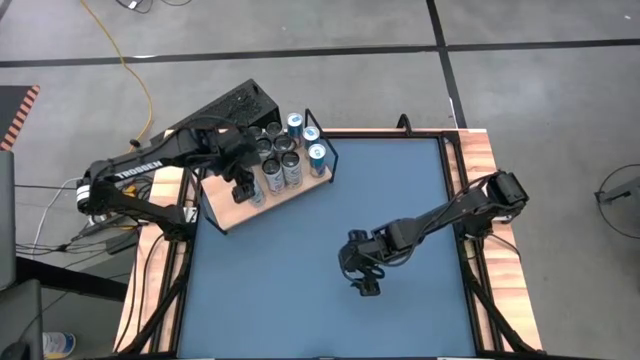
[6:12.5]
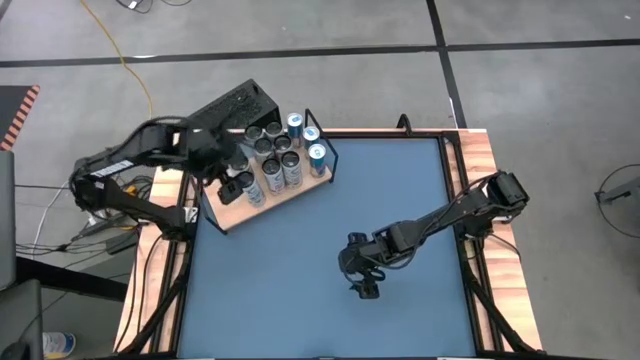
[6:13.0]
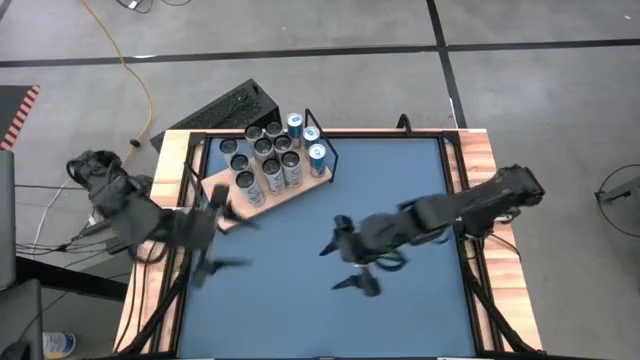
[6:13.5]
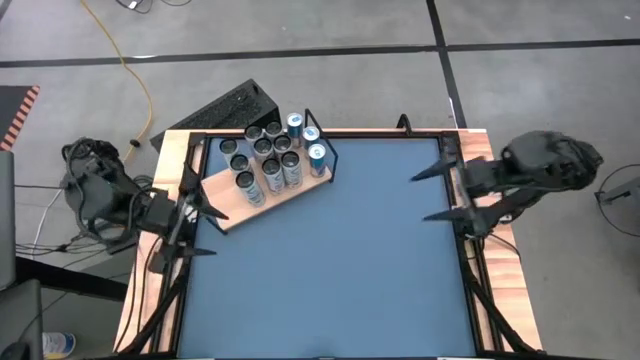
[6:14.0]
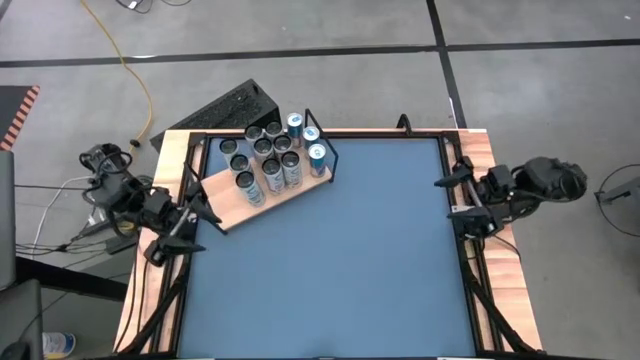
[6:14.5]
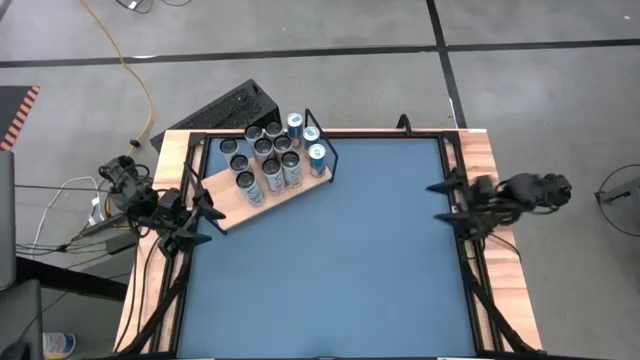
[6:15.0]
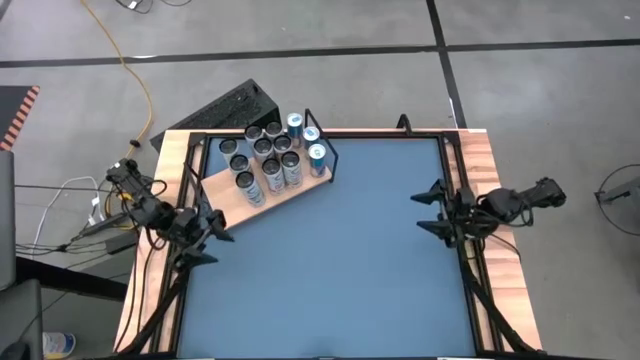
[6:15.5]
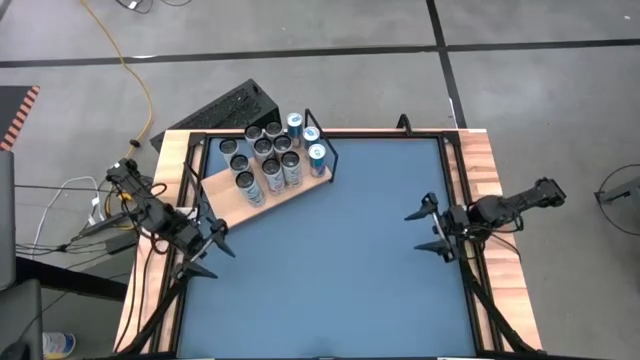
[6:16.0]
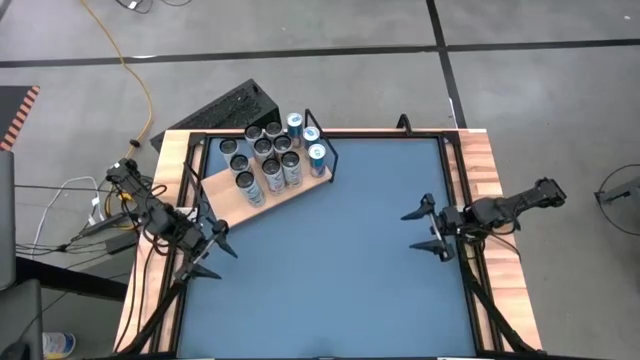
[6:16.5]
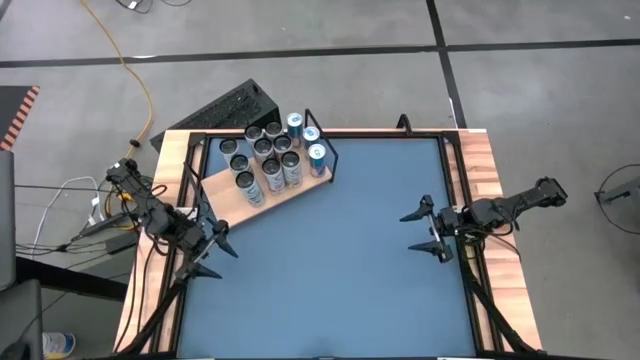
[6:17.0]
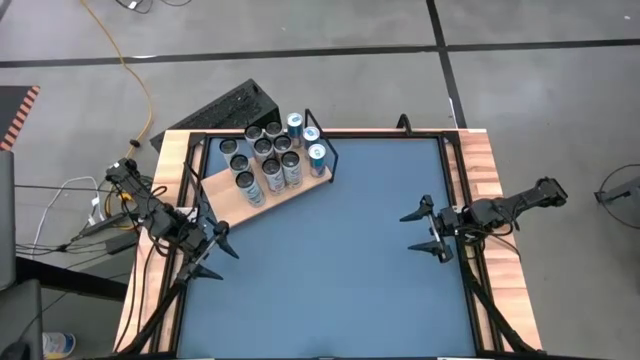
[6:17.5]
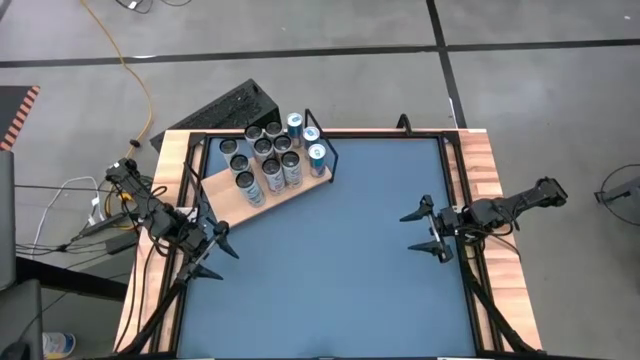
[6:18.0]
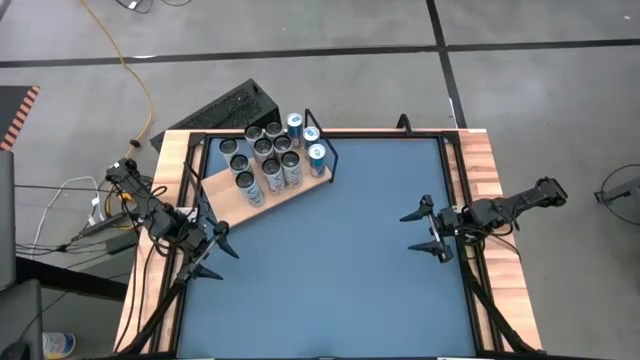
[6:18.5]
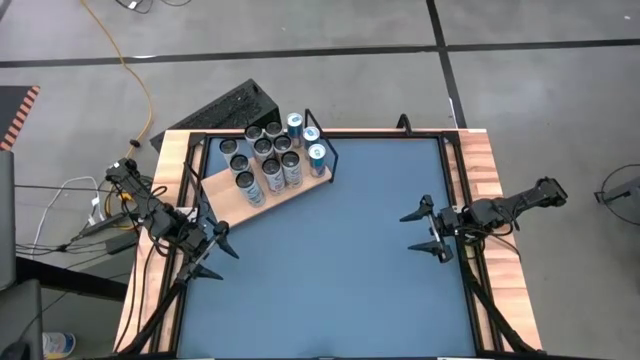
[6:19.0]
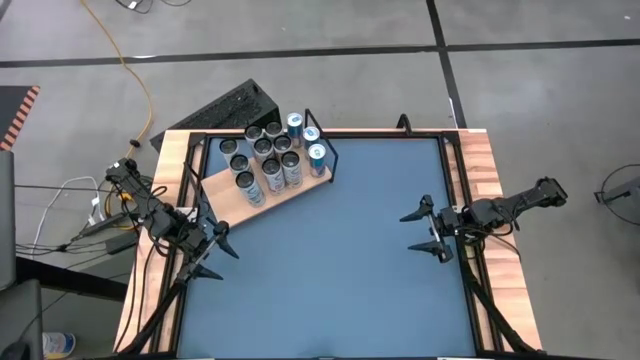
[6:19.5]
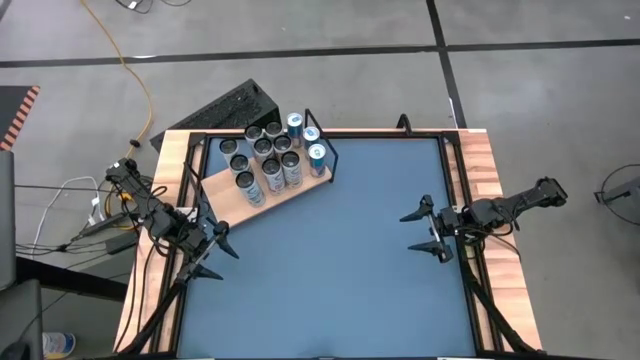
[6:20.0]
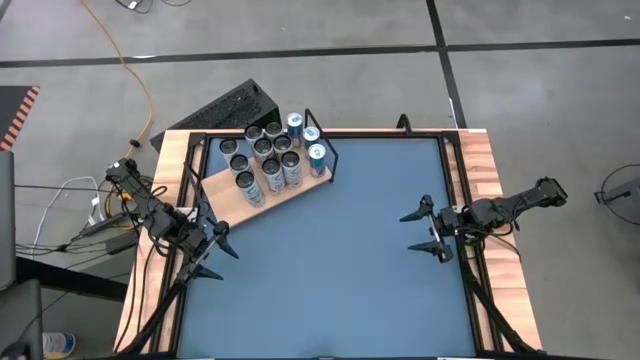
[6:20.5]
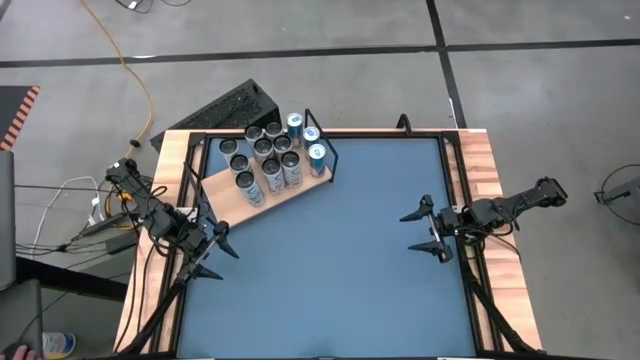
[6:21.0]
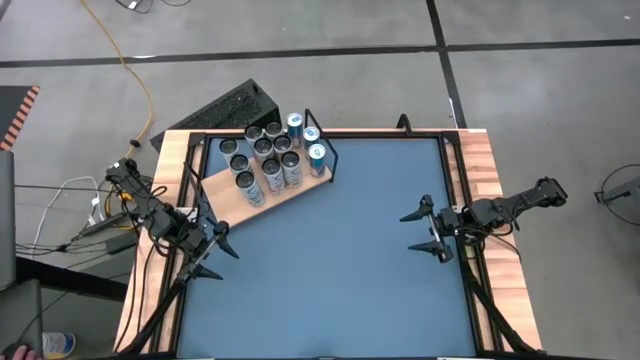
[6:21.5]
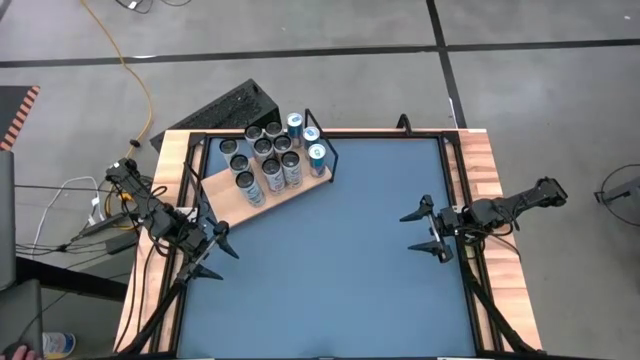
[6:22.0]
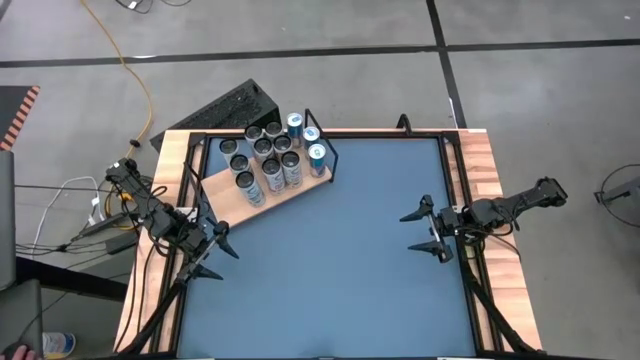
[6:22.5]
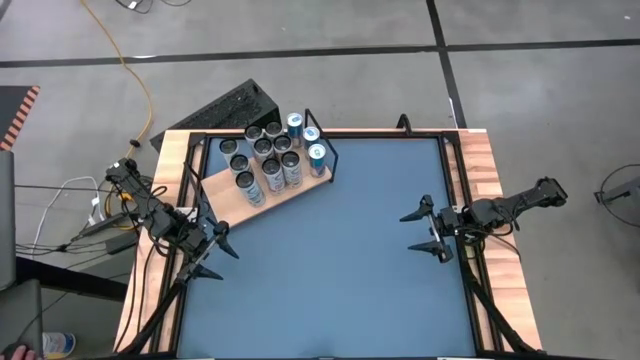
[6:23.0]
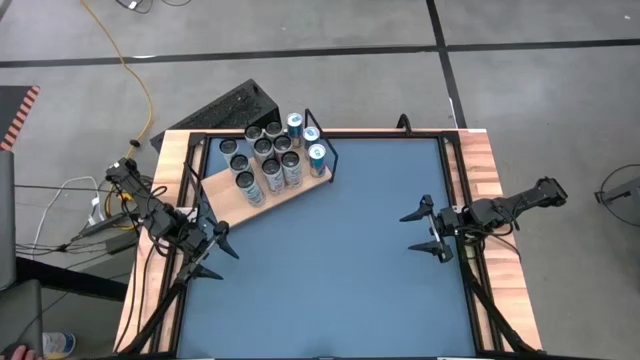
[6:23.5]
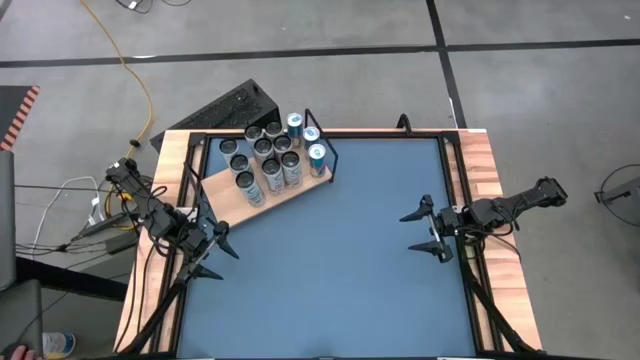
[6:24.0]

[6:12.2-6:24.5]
Task: Place canned beverage on shelf
Return to Home Position

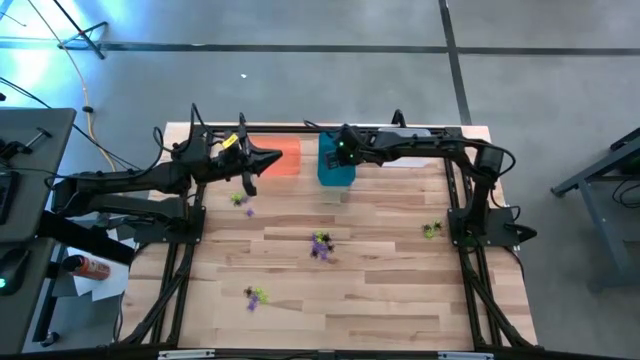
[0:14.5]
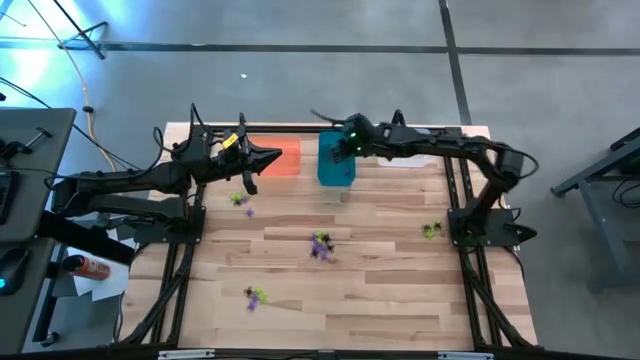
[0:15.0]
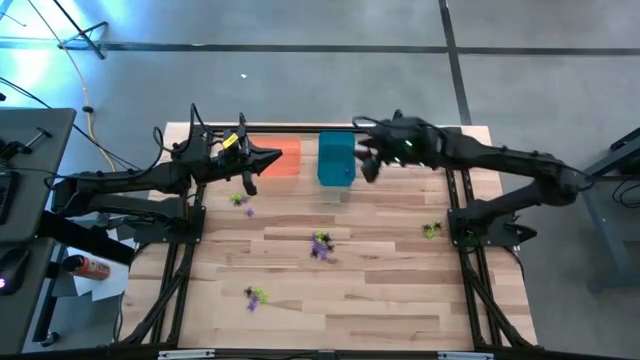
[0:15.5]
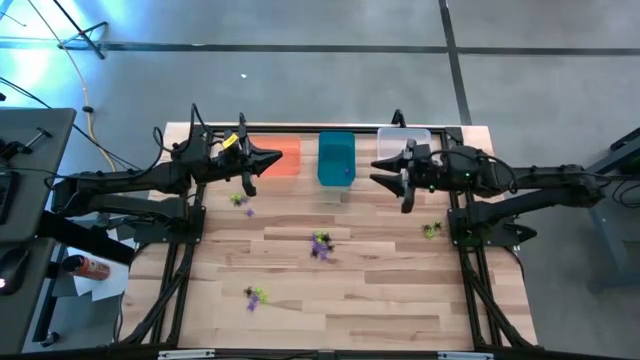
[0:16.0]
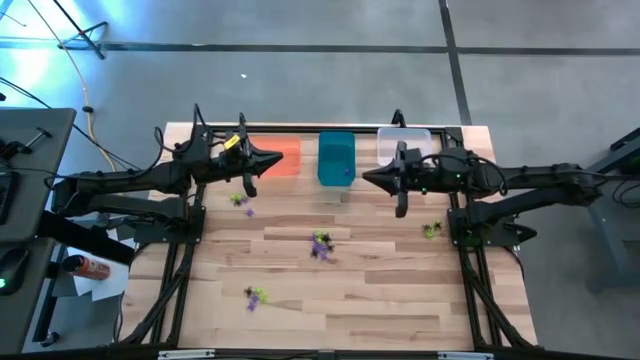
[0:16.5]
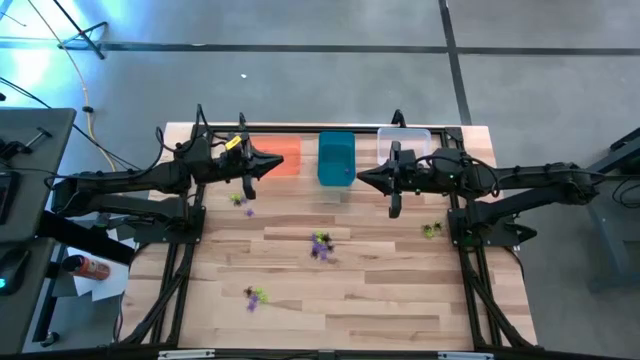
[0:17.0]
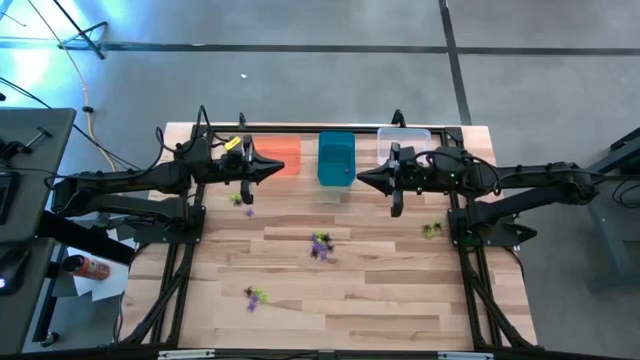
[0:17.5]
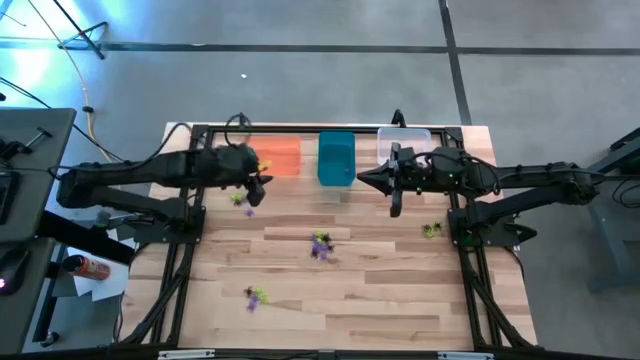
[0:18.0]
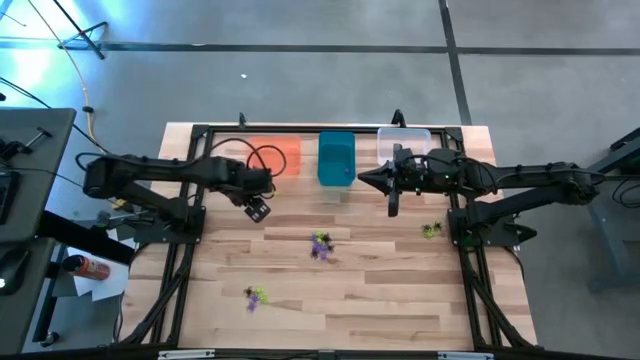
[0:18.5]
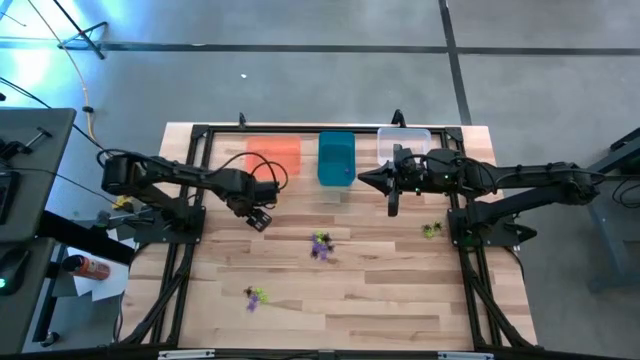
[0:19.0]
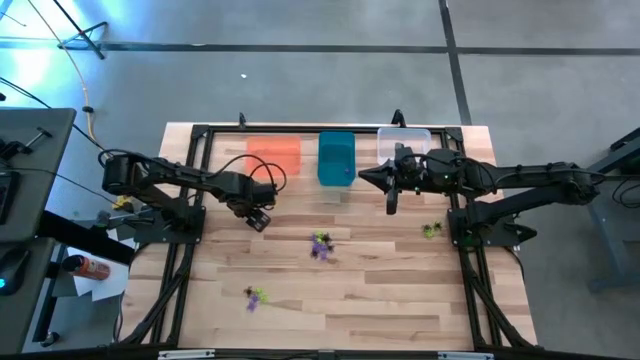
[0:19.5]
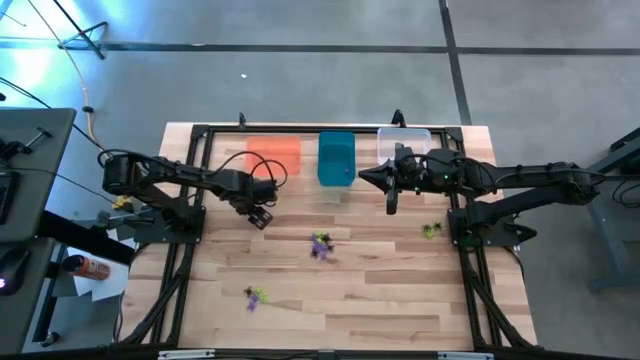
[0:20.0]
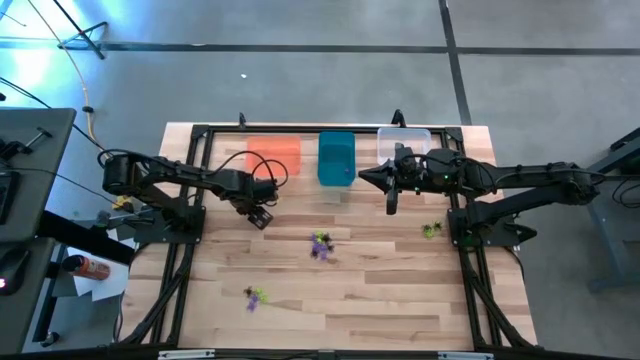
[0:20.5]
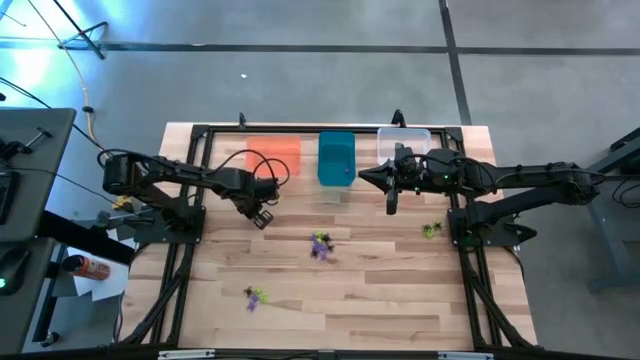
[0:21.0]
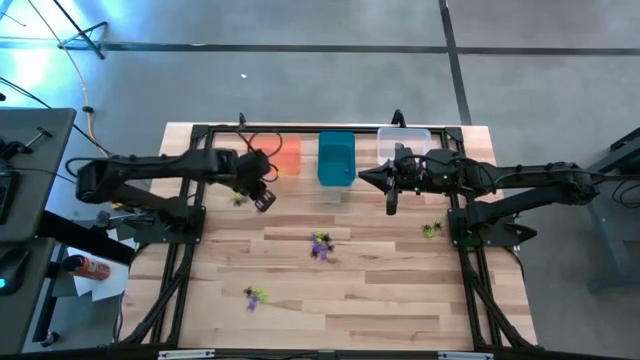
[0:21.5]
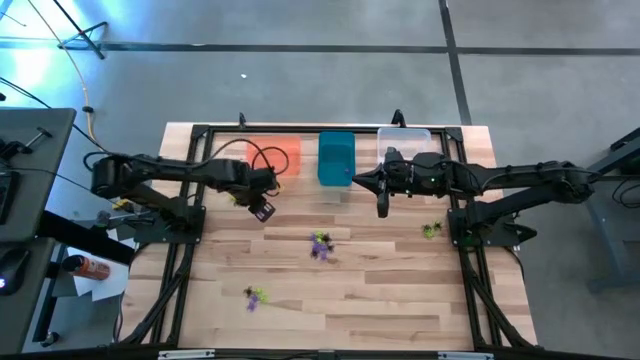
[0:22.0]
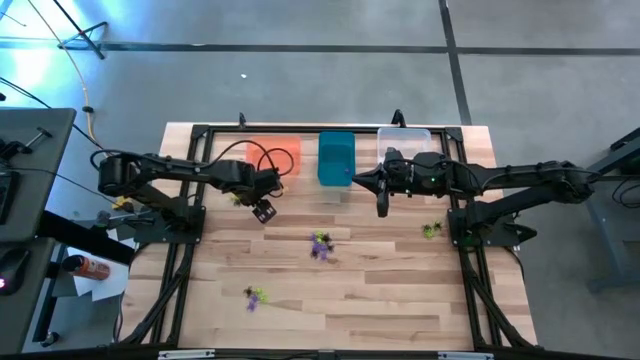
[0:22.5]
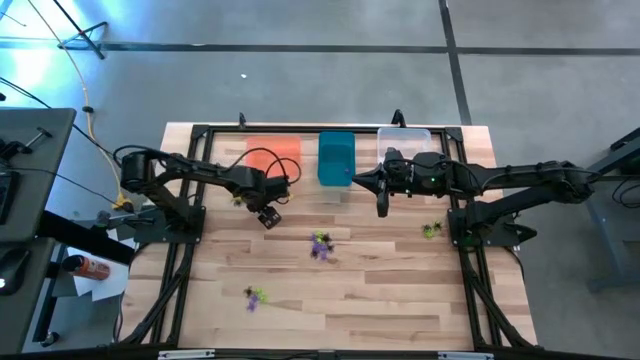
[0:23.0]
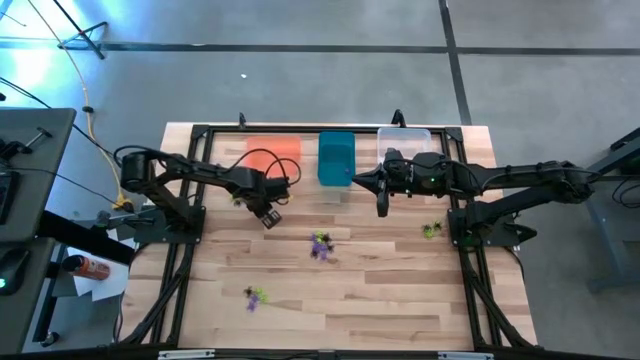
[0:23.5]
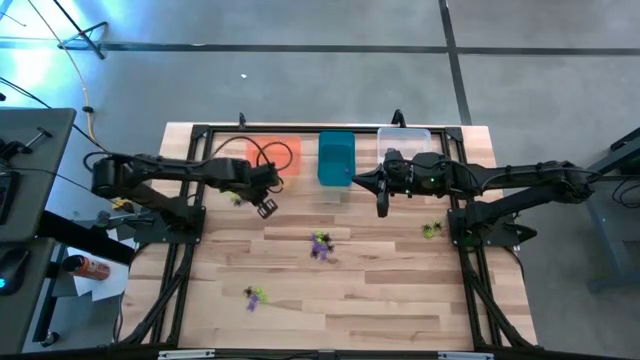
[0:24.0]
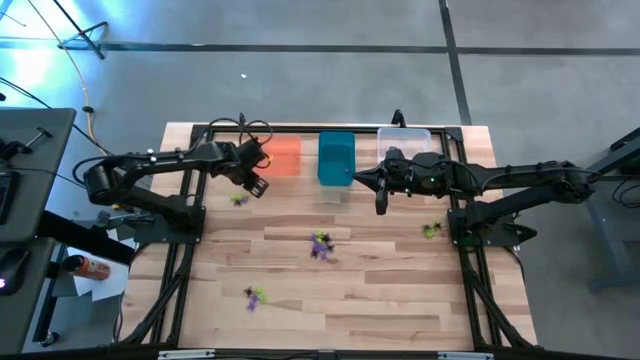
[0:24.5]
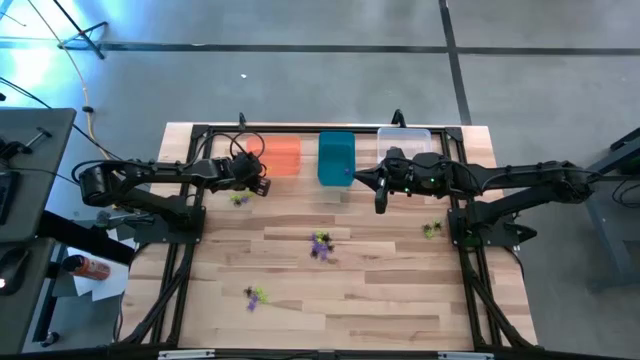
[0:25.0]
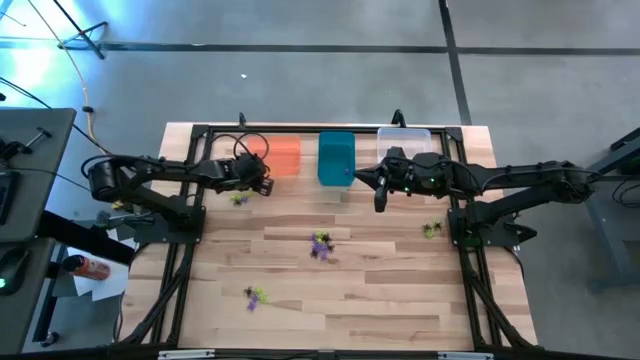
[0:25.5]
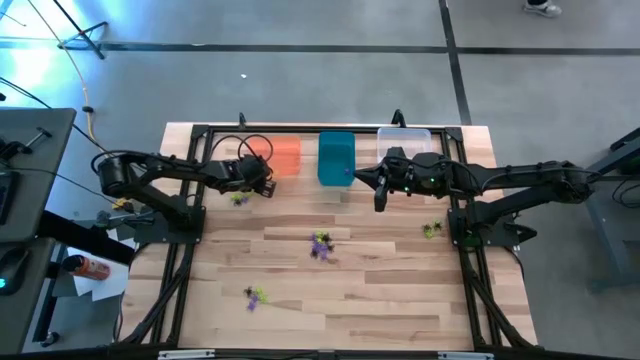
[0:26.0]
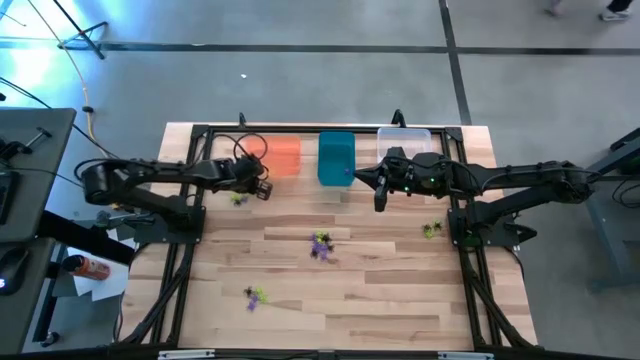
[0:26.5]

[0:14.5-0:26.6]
Task: Sort Halloween decoration
Put the purple spider toy into the blue bin
